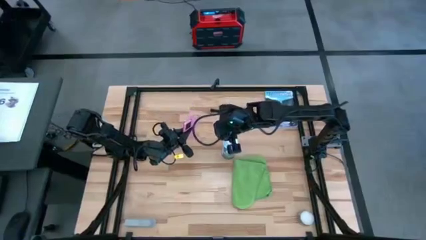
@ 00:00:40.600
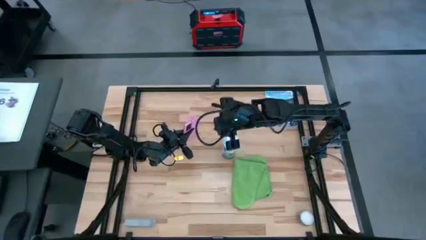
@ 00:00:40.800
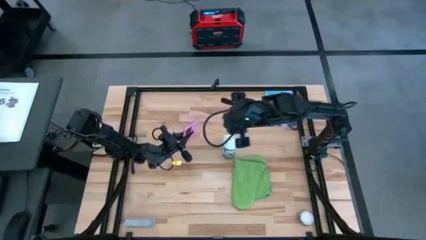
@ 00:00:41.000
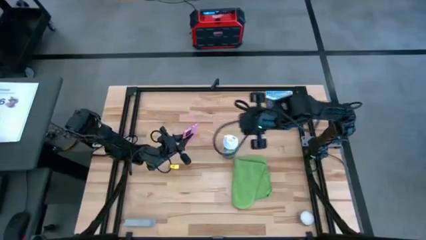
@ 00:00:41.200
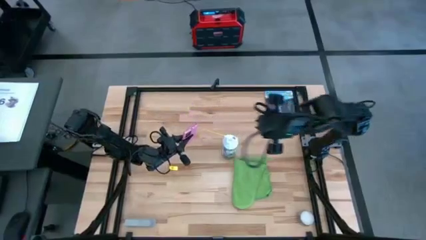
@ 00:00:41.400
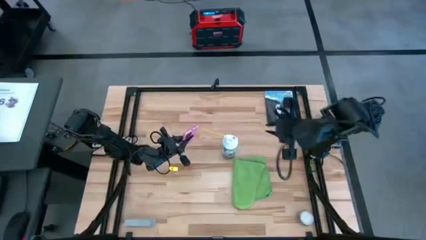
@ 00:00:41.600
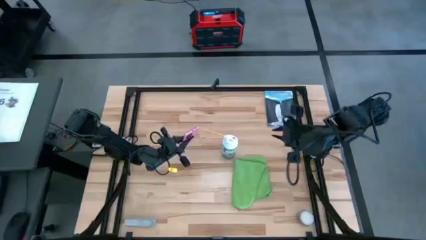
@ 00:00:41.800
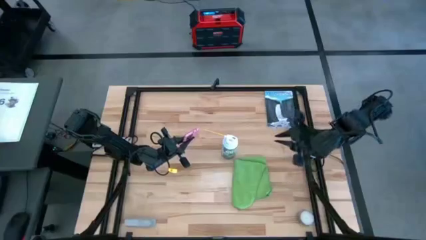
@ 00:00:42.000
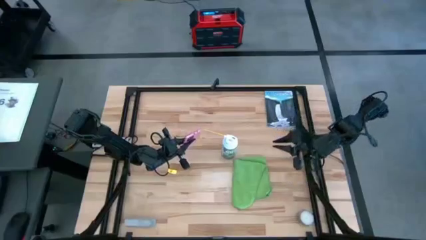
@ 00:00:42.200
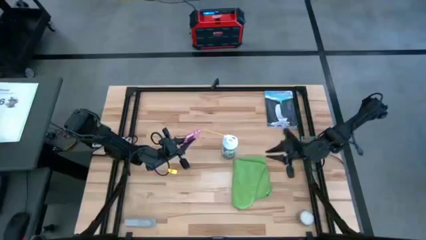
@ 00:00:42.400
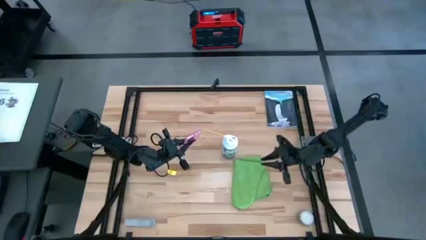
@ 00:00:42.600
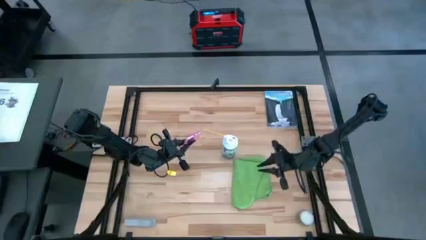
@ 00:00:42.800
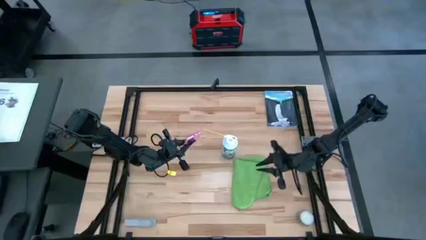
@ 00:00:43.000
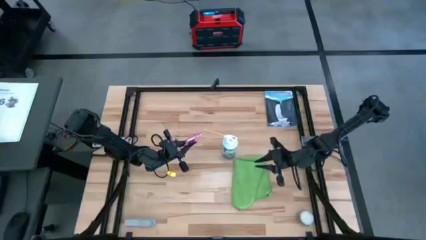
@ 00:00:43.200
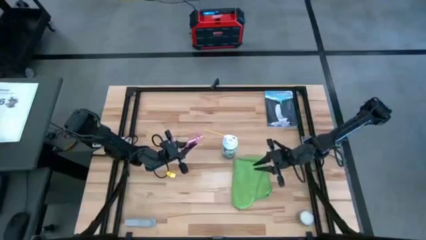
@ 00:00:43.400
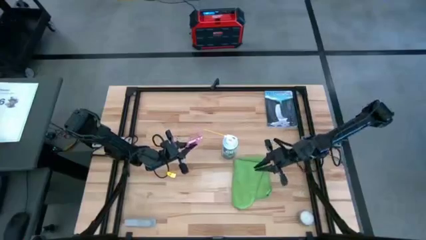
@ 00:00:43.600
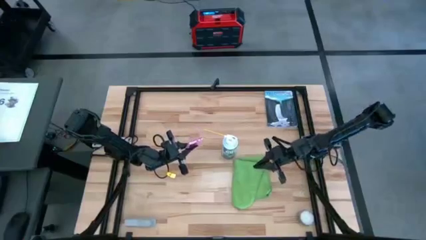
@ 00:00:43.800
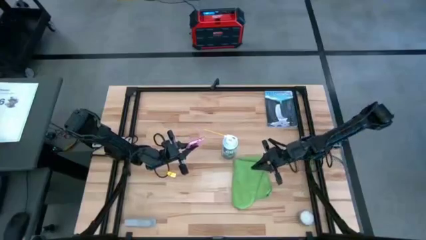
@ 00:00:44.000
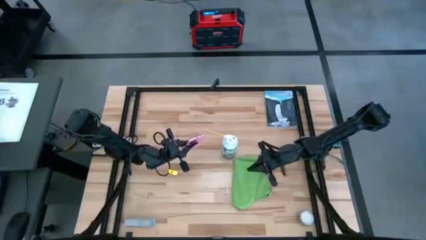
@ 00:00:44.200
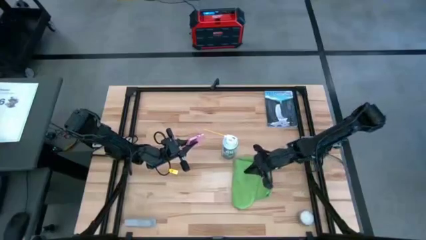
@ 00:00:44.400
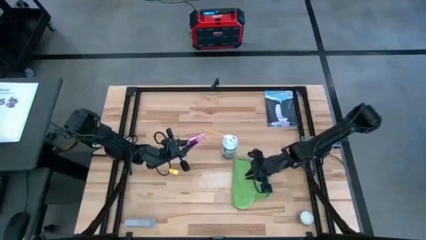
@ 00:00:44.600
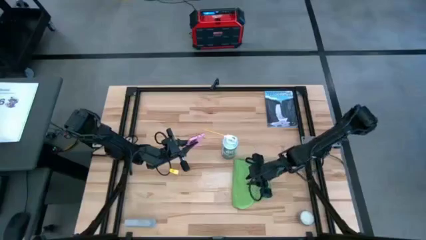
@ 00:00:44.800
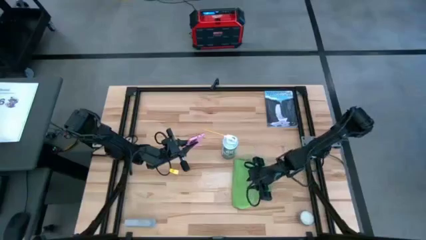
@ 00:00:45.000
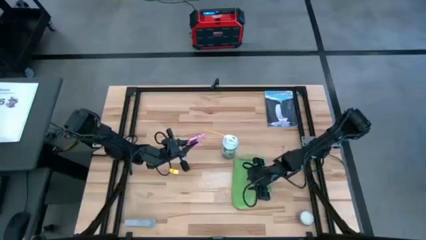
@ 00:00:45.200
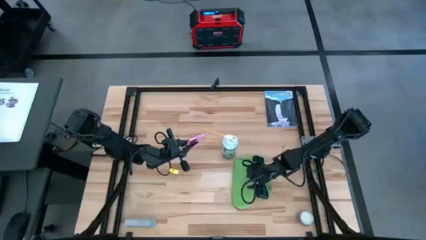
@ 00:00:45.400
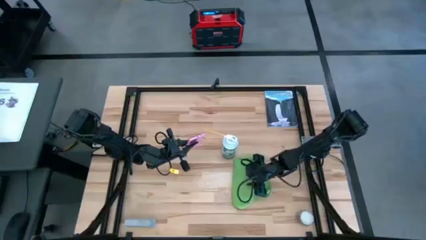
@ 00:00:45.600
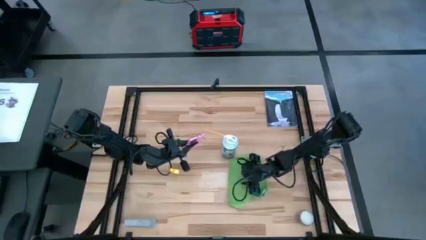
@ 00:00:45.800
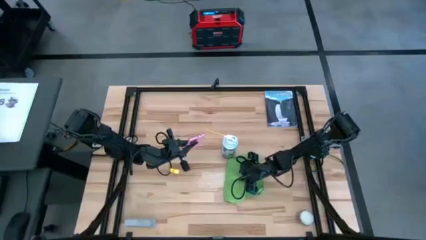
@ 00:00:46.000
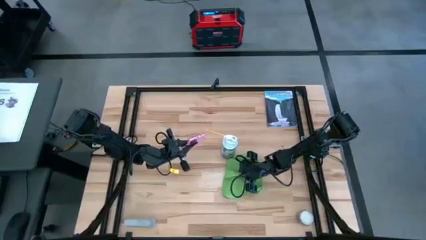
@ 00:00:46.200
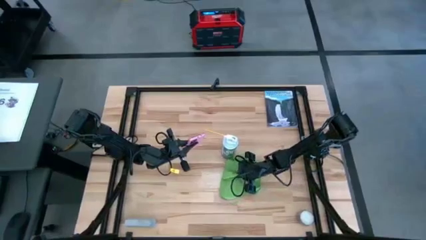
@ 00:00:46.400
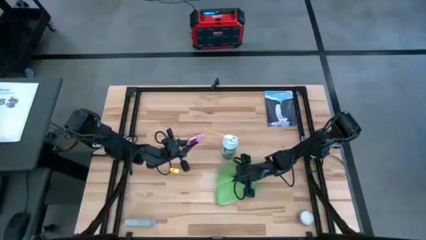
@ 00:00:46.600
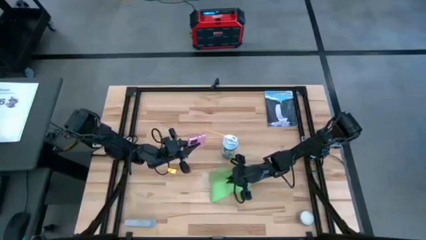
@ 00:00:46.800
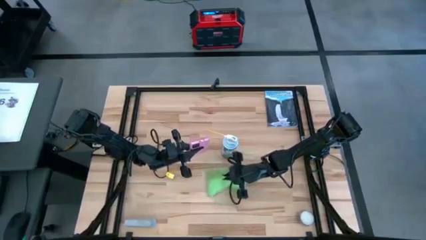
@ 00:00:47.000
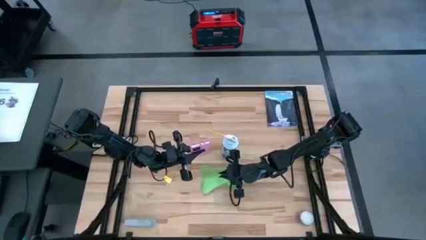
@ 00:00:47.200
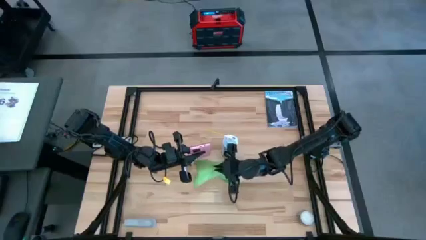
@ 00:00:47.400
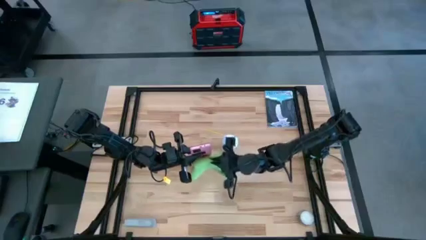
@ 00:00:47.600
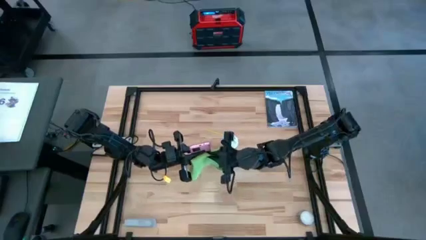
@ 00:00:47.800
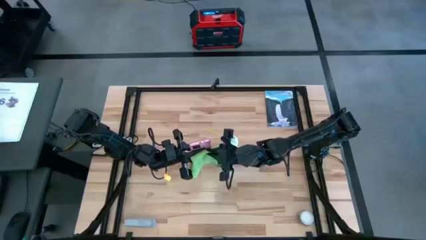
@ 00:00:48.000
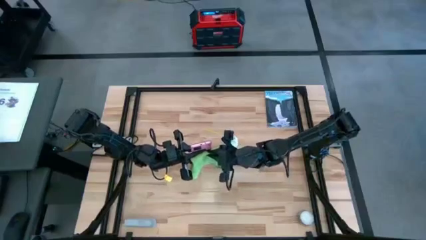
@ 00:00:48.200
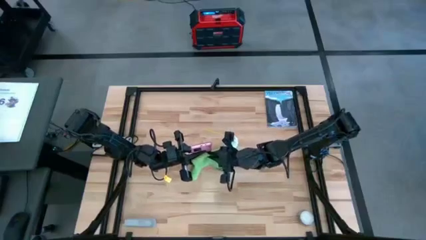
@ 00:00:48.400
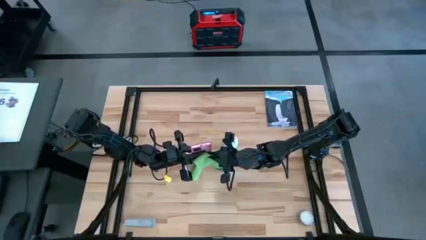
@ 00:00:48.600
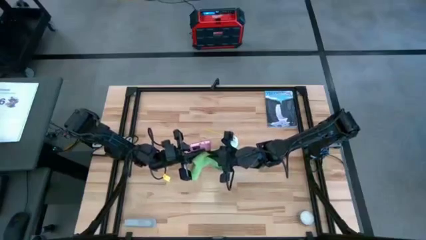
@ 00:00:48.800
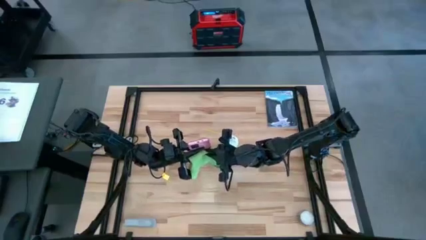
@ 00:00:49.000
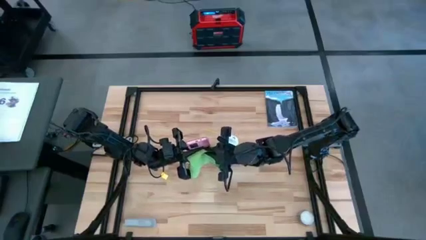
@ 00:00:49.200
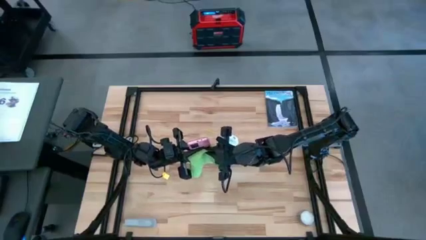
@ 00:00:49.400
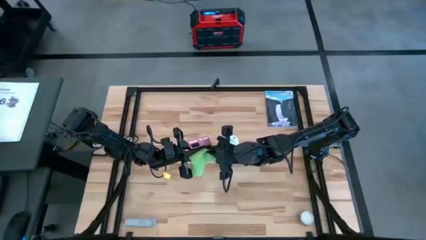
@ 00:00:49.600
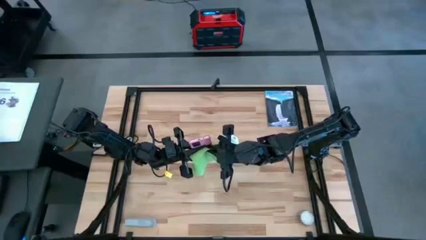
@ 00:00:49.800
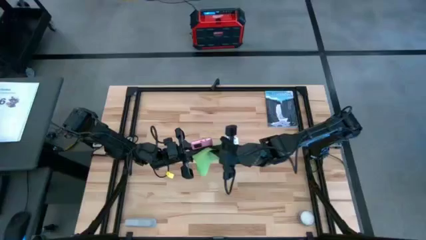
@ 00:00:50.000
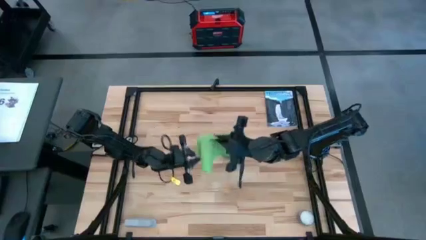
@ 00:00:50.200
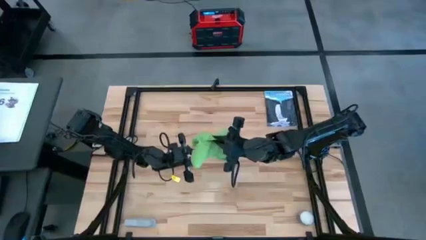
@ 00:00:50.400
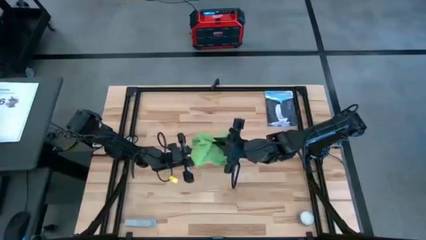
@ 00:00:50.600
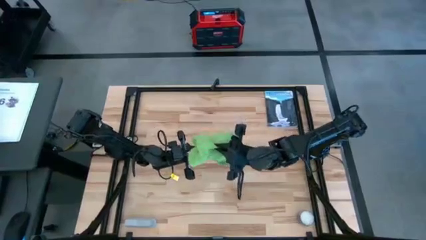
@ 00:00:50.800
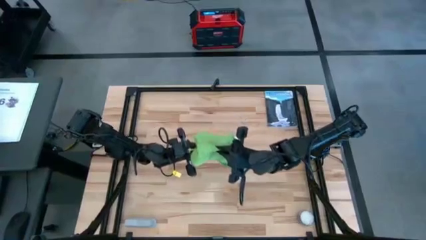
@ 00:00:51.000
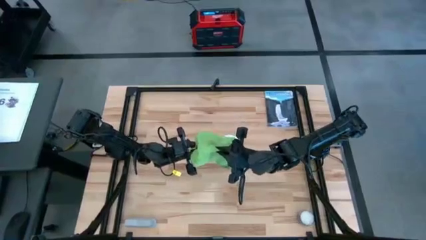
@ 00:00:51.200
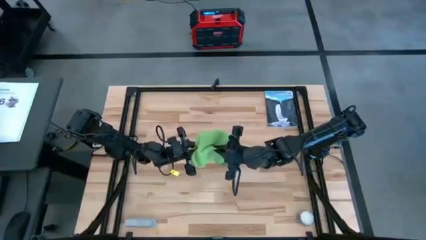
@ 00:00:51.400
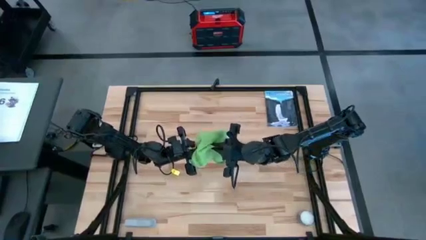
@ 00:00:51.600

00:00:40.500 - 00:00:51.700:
Task: Apply microfiber cloth
Wipe the back of the pink phone using the green microfiber cloth
